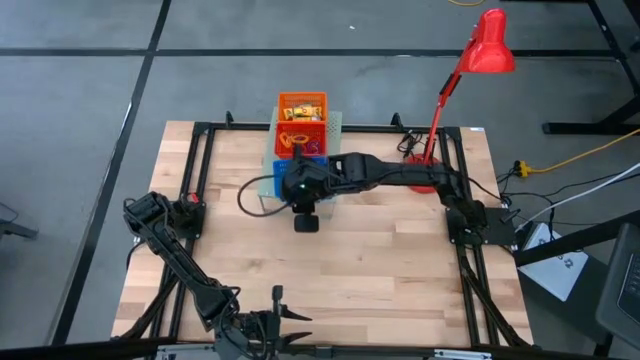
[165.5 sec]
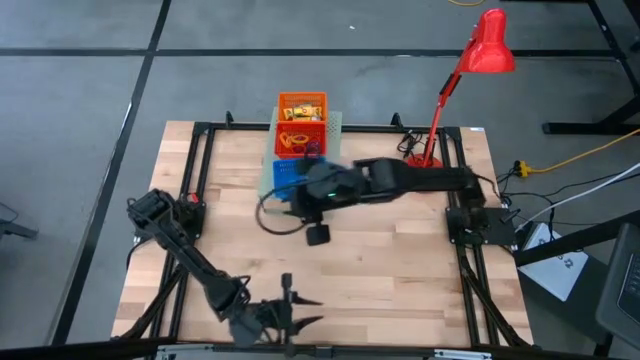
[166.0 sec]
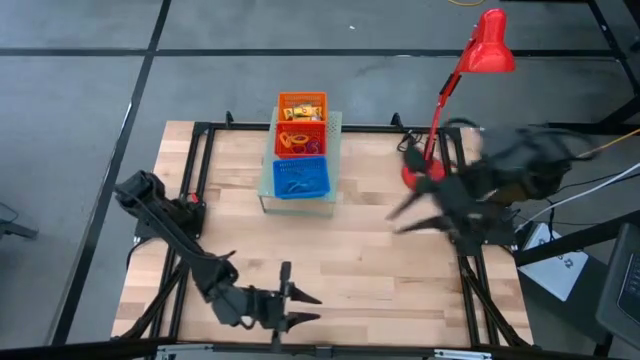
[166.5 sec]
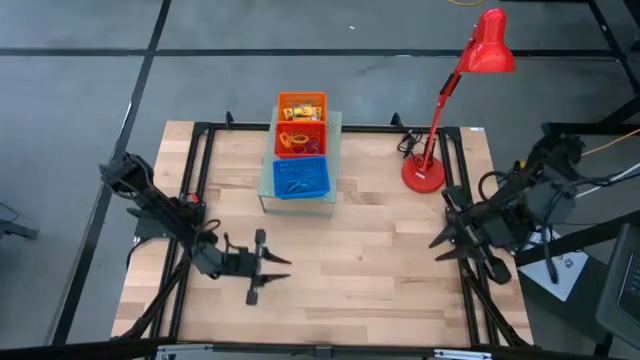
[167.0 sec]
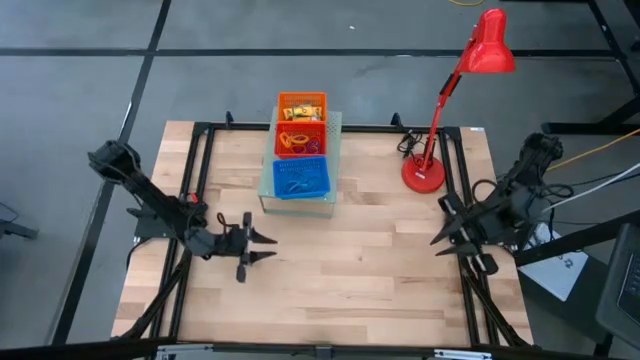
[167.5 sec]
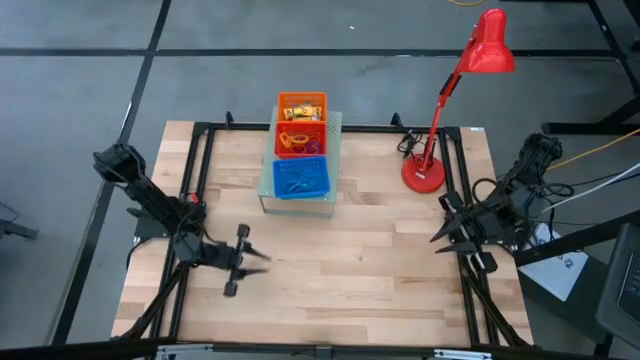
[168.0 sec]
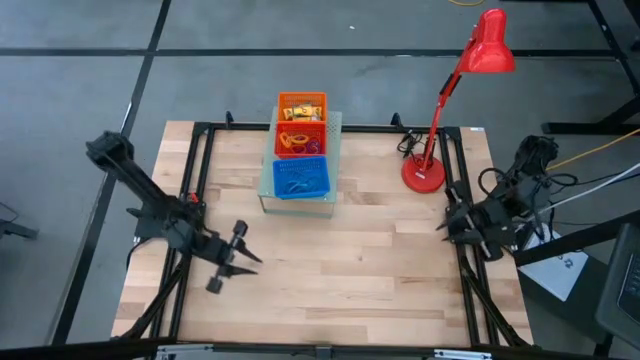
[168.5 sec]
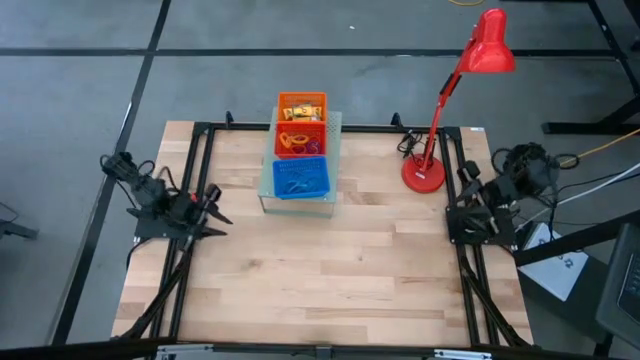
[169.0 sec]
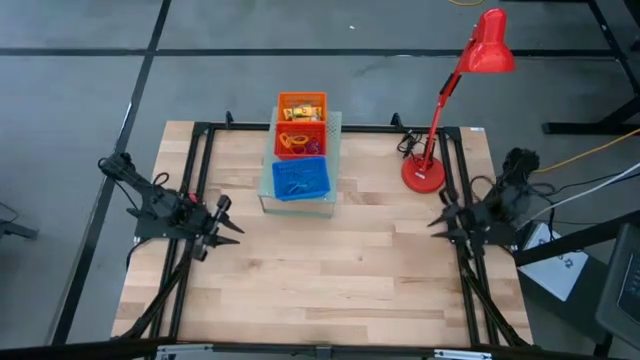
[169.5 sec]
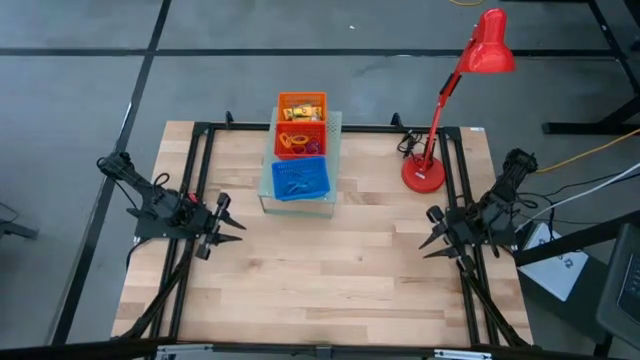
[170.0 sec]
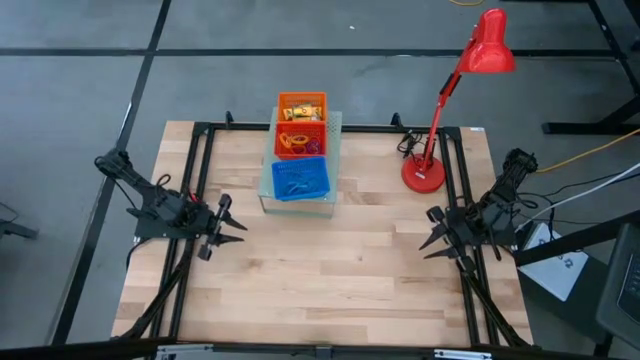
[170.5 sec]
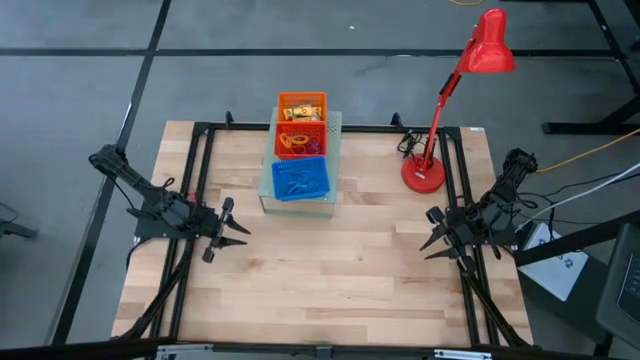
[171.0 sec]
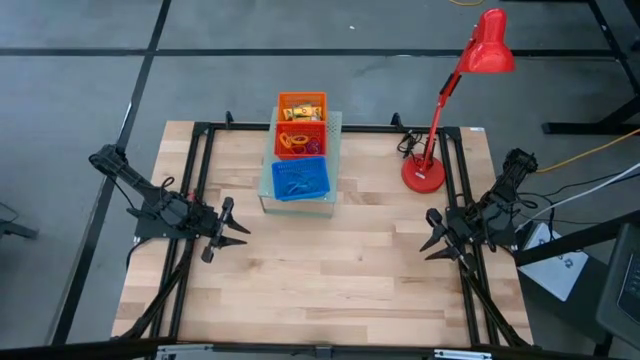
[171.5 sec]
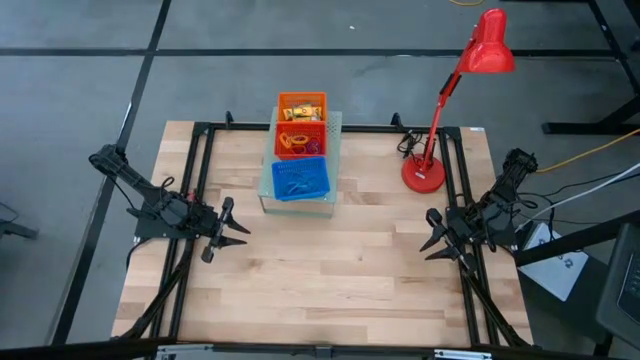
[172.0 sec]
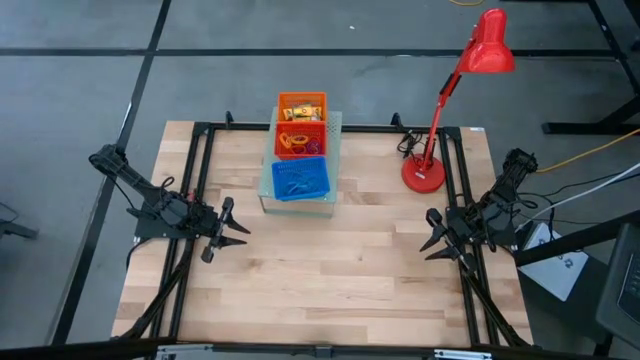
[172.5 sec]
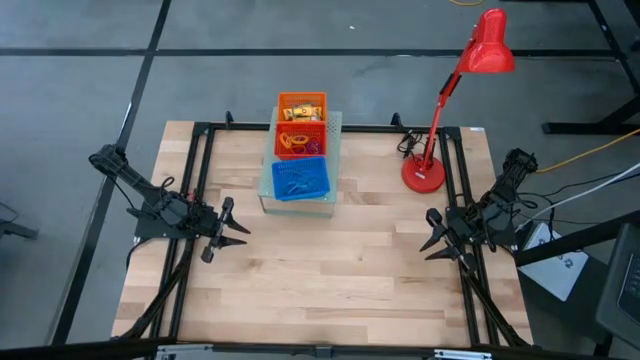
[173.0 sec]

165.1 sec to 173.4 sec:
Task: Pick & Place Office Desk Supplies
Return to Home Position

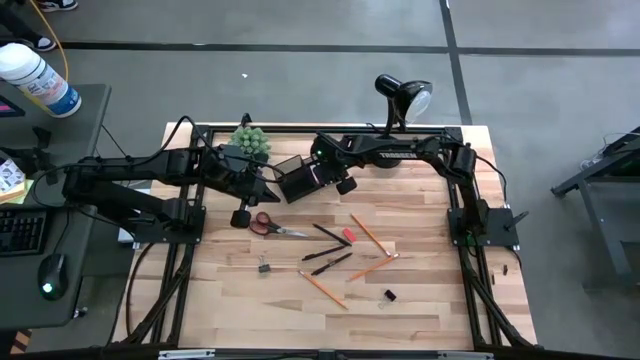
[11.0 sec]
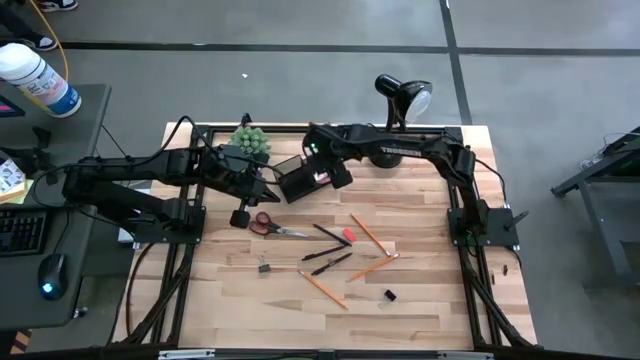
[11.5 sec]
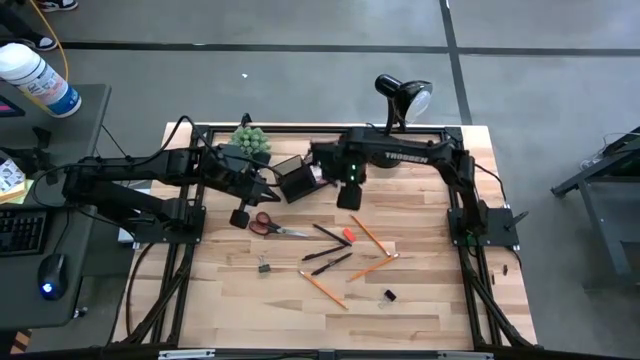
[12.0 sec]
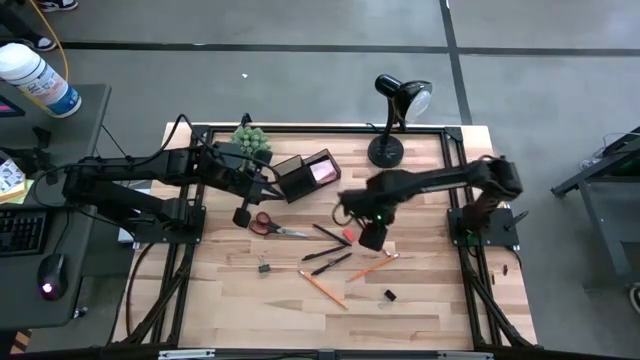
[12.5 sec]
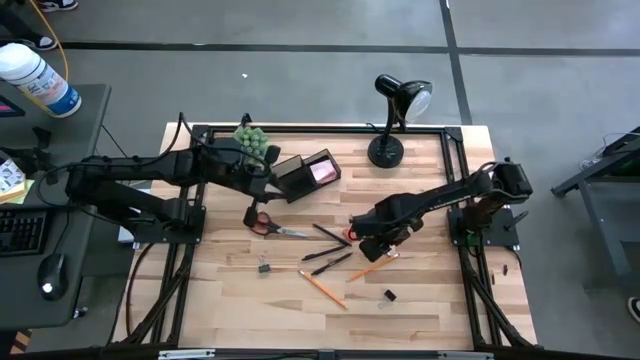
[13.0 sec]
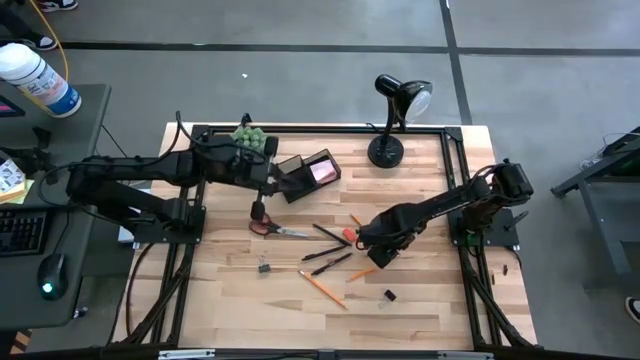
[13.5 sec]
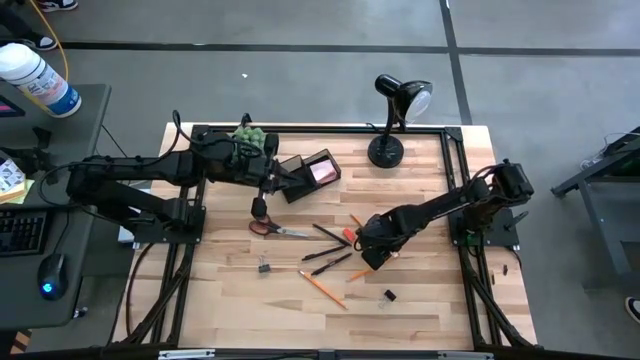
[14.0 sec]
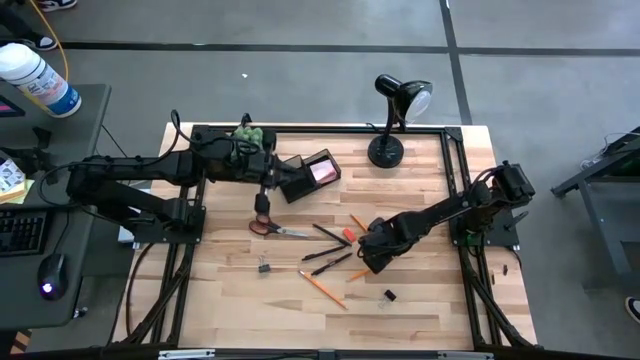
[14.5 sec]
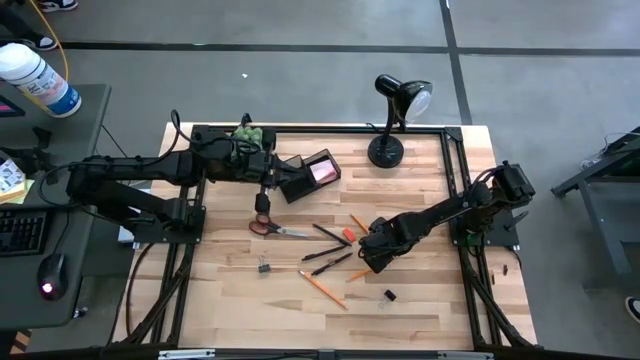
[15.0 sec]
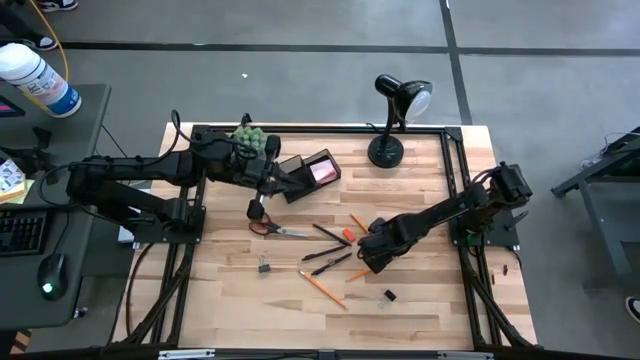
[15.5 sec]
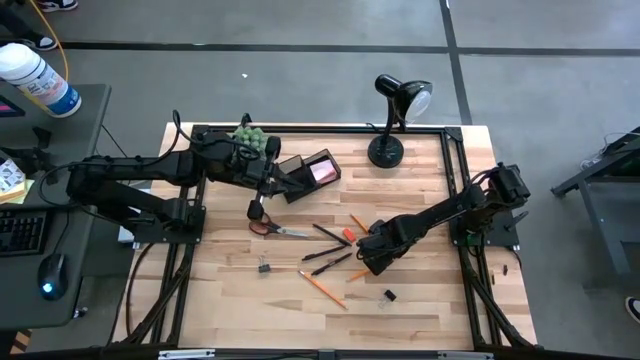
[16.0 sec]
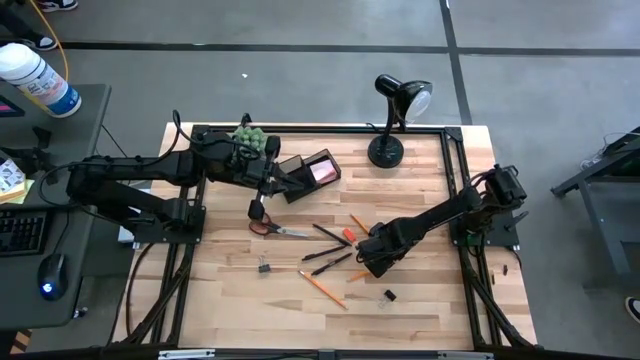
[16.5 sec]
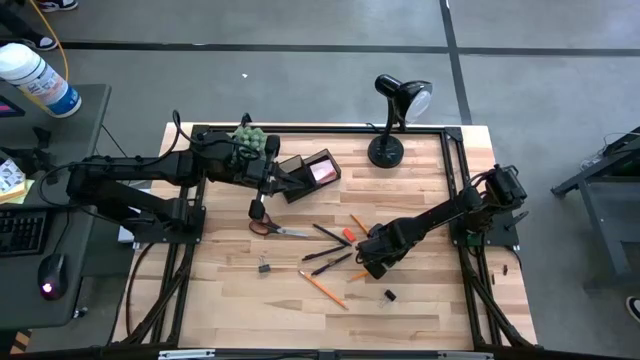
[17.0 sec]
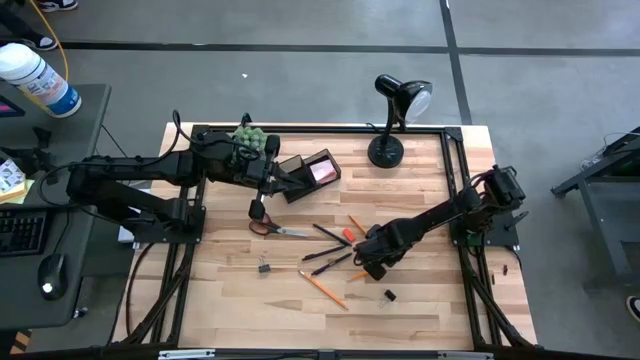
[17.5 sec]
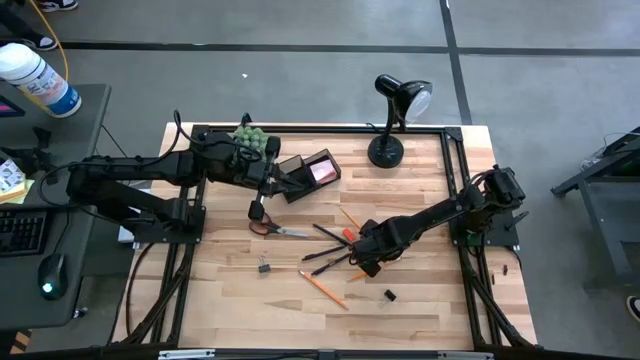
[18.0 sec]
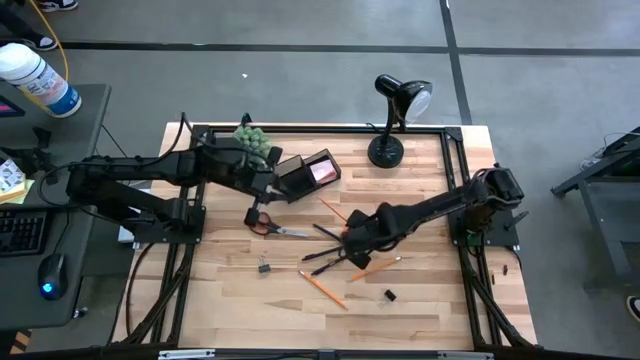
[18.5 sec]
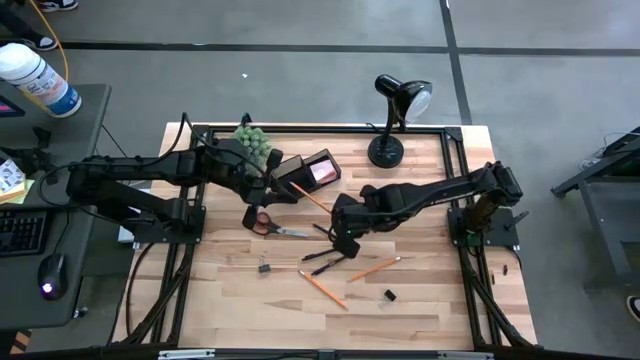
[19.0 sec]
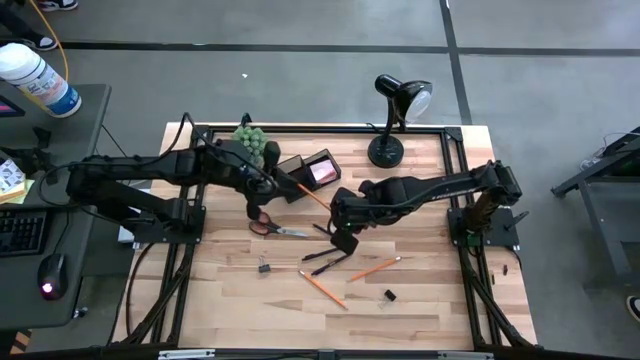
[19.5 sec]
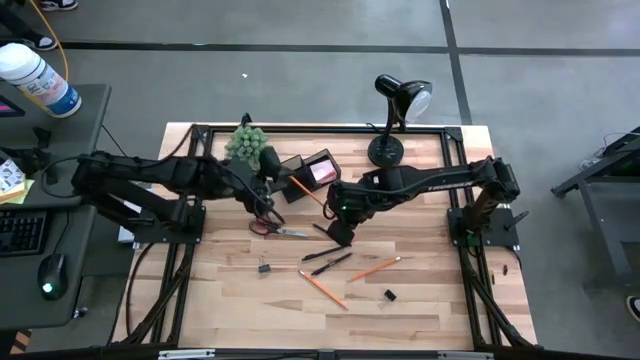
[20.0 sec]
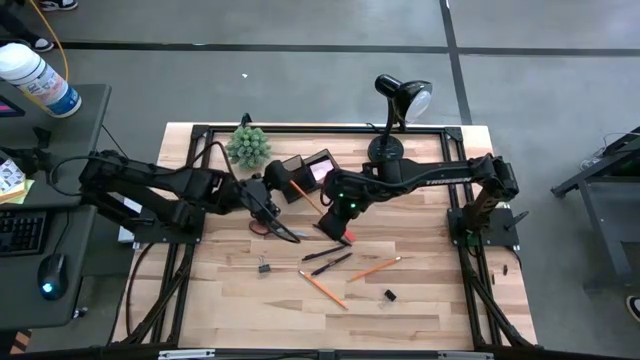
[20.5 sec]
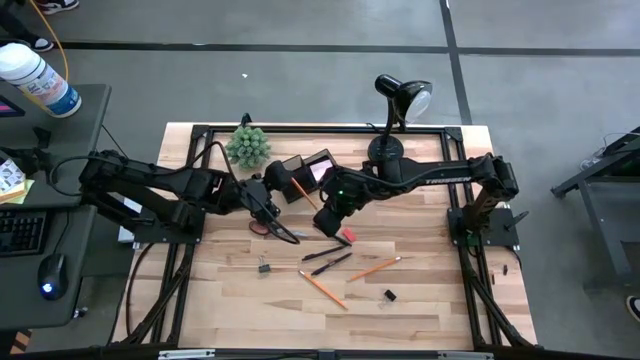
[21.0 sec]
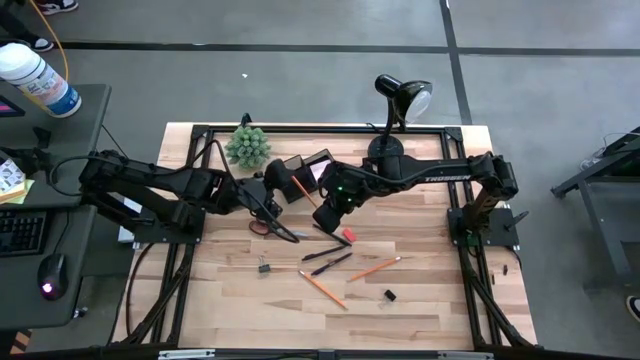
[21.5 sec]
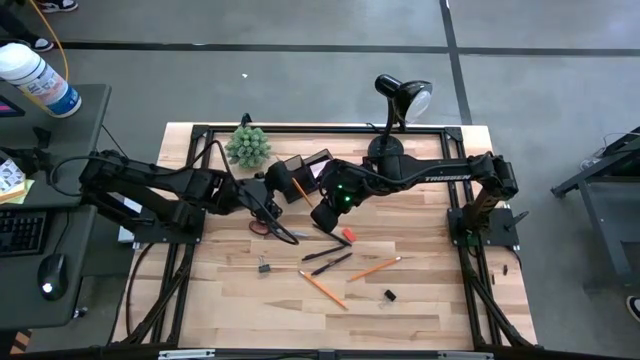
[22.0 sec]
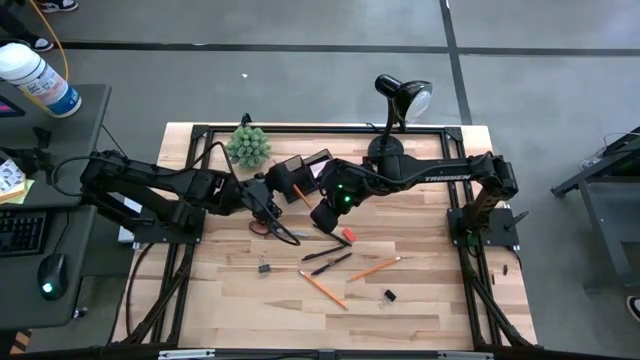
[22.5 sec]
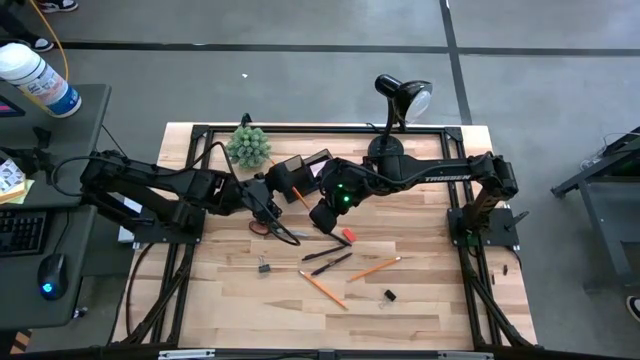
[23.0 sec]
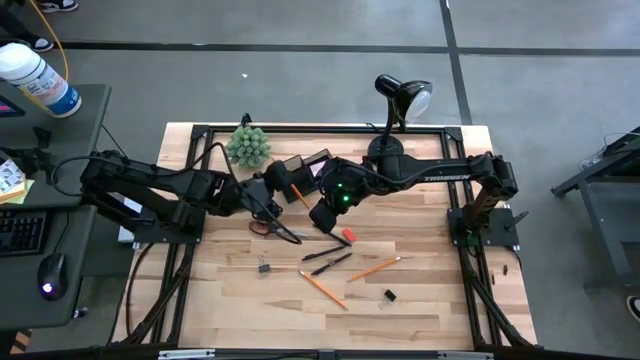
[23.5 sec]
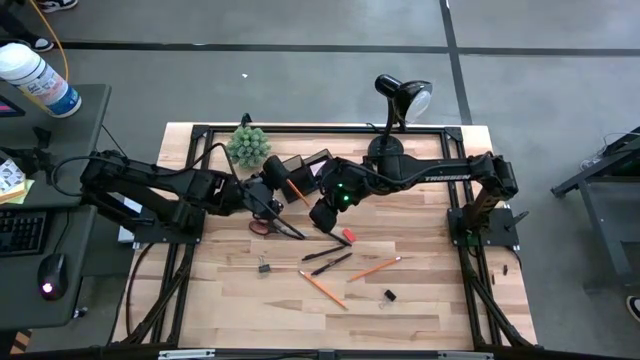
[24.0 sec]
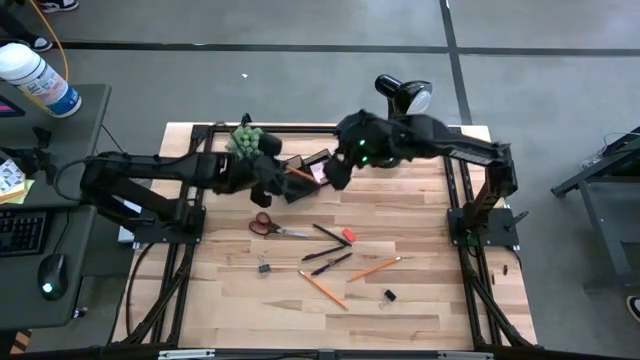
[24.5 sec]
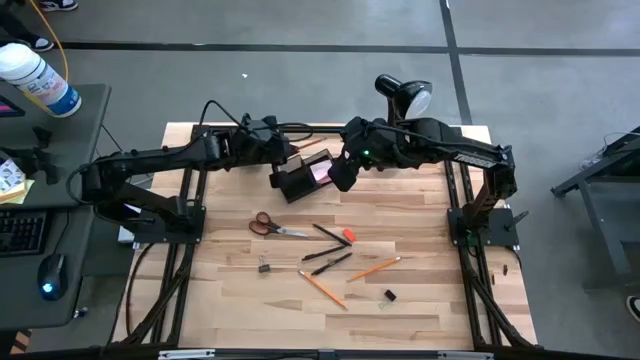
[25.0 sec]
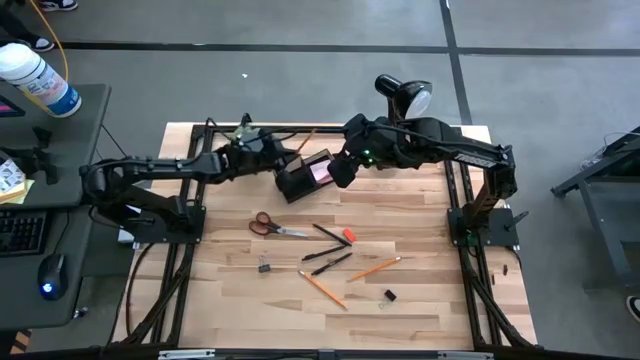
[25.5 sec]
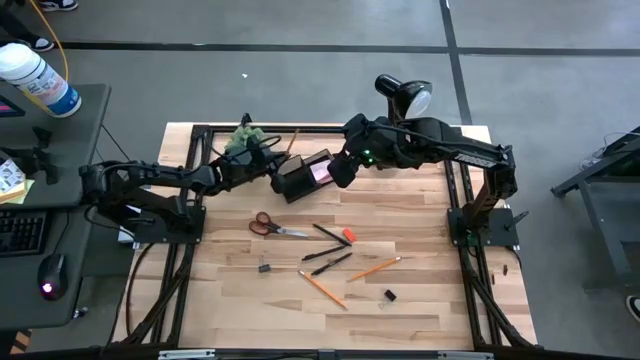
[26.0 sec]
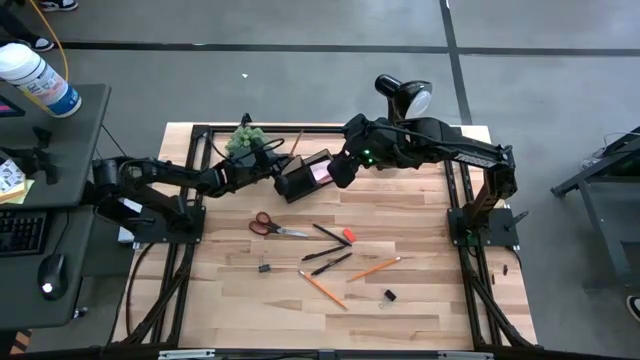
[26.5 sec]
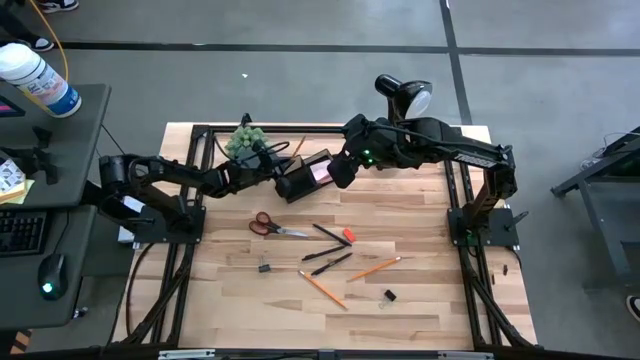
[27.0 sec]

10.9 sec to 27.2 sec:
Task: Pick and place office supplies into organizer
Put the top right orange pencil into the black desk organizer
